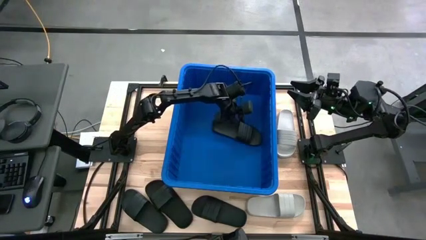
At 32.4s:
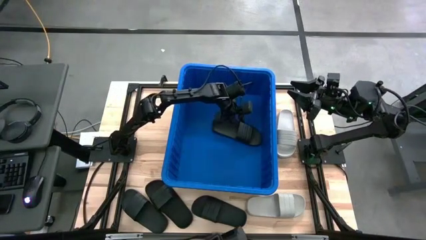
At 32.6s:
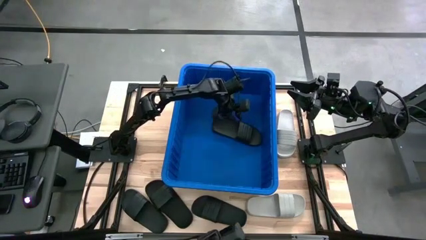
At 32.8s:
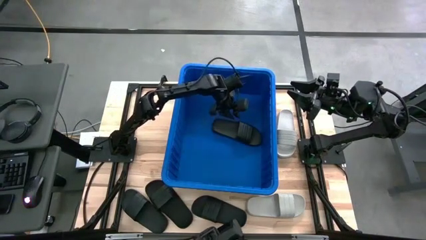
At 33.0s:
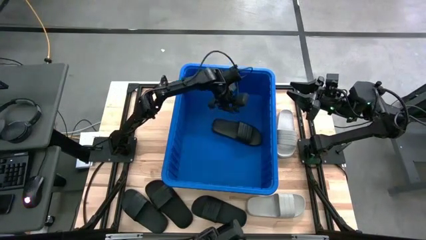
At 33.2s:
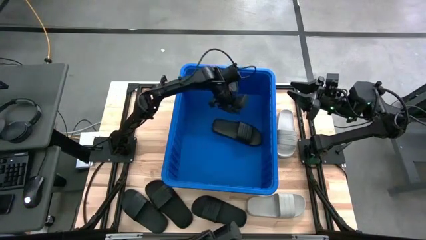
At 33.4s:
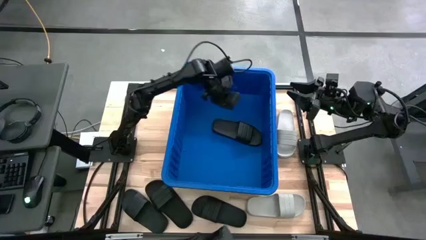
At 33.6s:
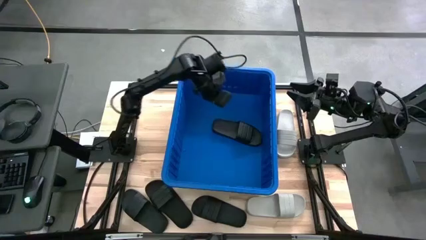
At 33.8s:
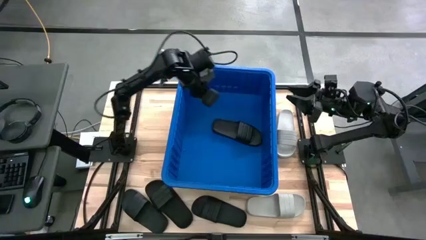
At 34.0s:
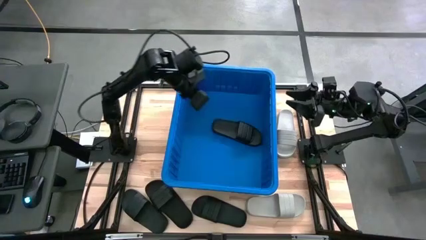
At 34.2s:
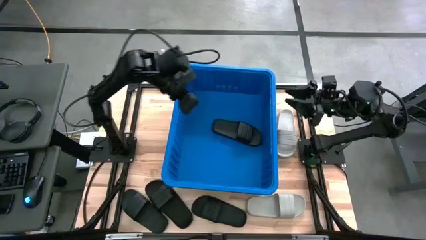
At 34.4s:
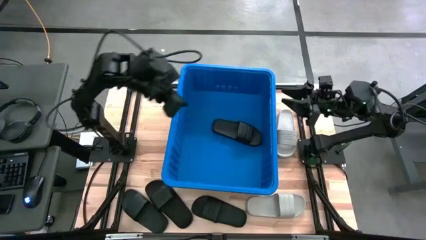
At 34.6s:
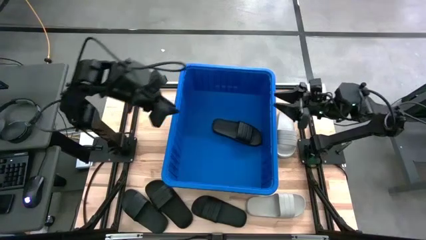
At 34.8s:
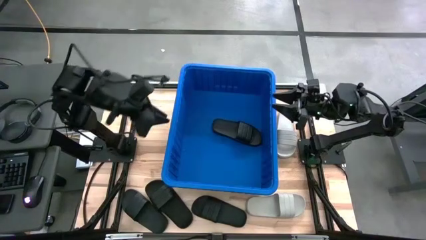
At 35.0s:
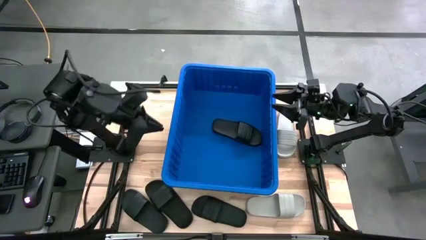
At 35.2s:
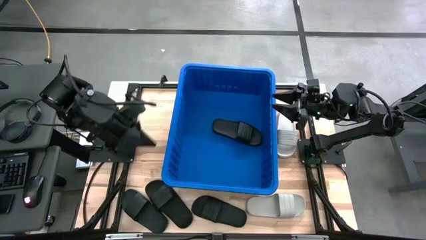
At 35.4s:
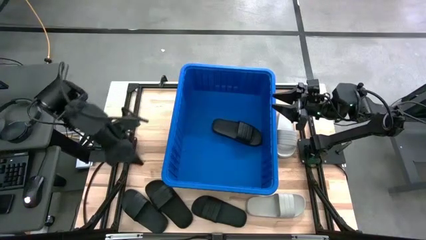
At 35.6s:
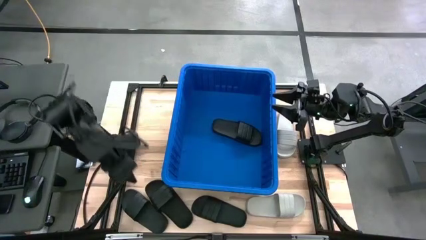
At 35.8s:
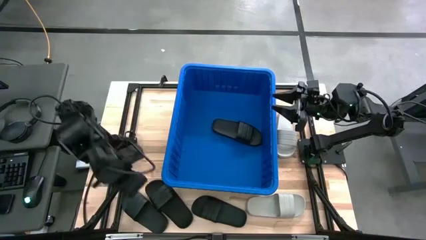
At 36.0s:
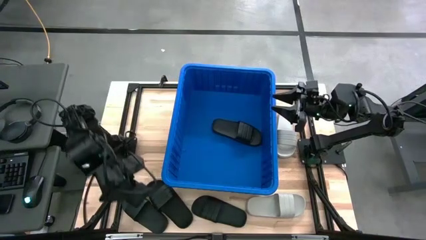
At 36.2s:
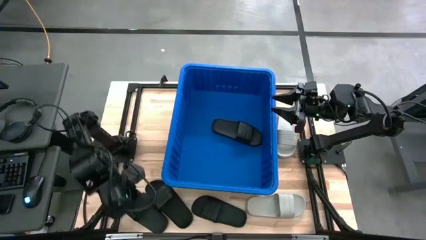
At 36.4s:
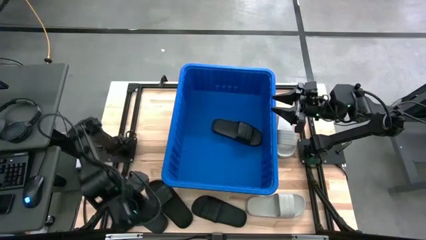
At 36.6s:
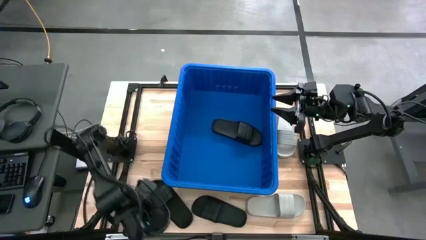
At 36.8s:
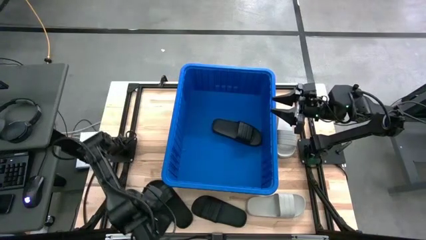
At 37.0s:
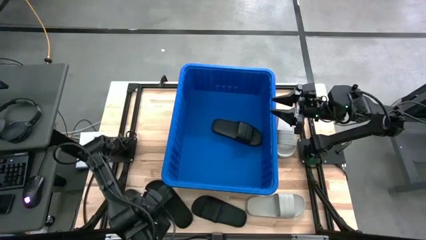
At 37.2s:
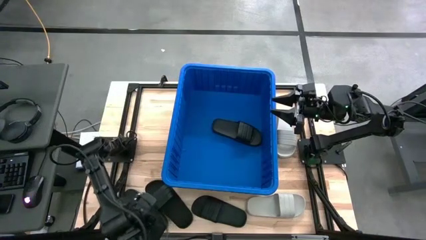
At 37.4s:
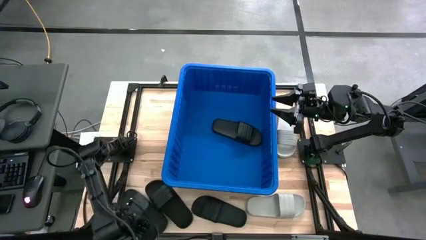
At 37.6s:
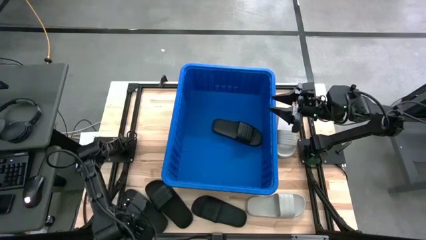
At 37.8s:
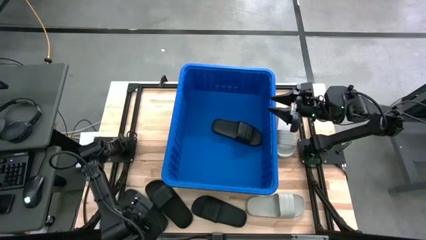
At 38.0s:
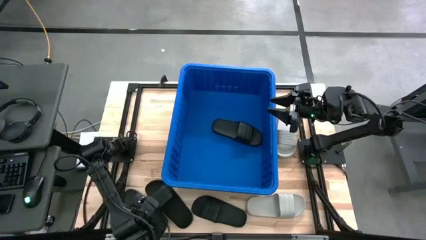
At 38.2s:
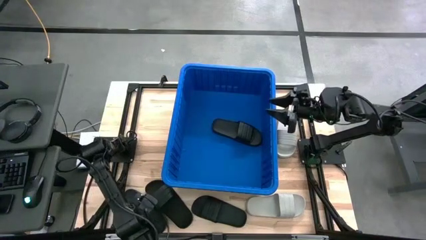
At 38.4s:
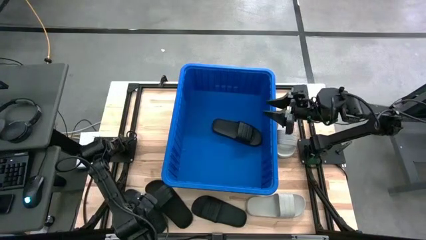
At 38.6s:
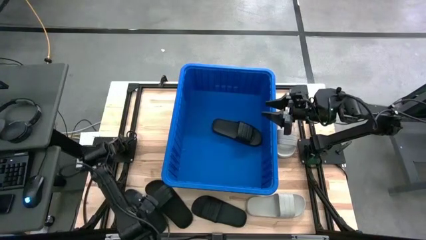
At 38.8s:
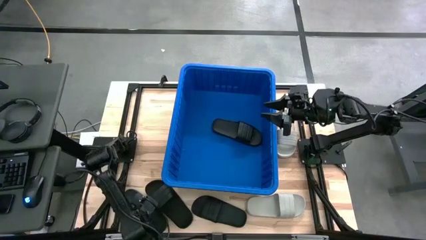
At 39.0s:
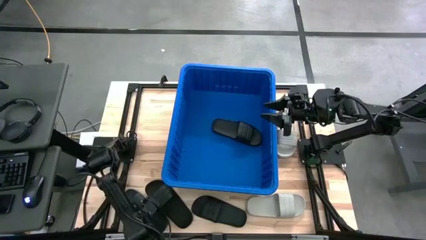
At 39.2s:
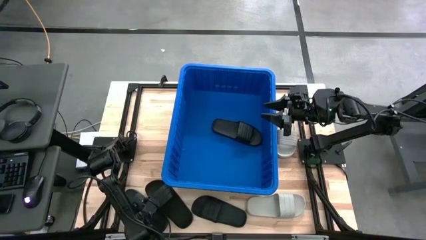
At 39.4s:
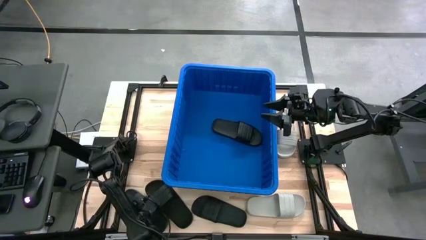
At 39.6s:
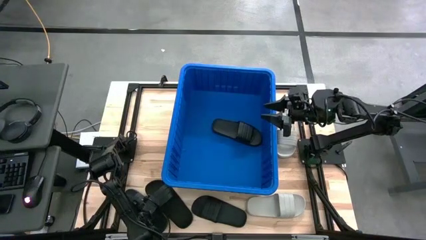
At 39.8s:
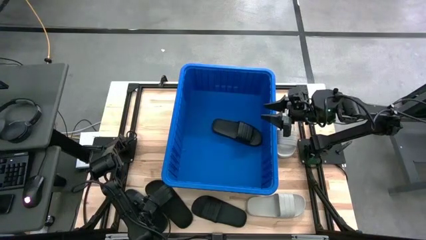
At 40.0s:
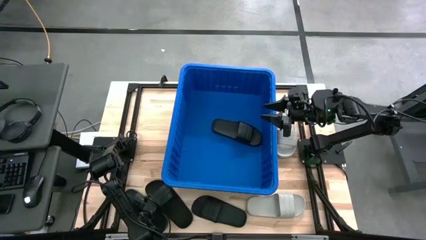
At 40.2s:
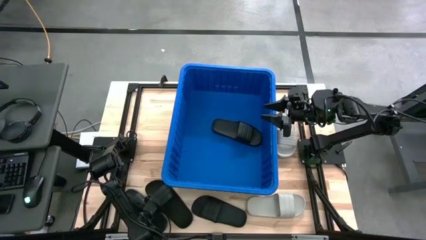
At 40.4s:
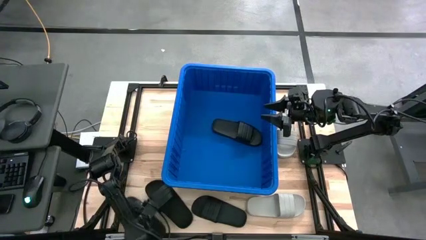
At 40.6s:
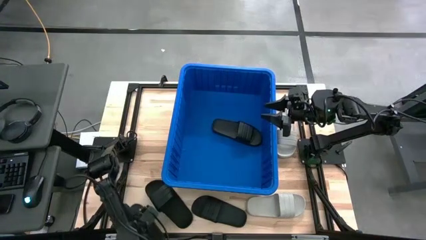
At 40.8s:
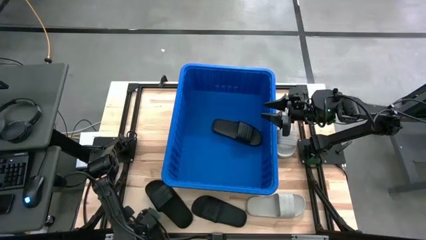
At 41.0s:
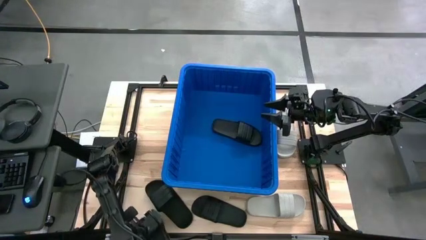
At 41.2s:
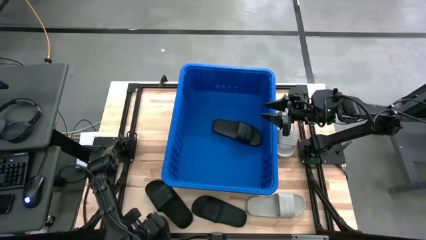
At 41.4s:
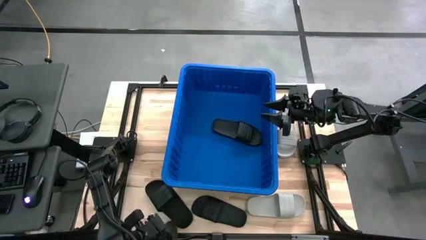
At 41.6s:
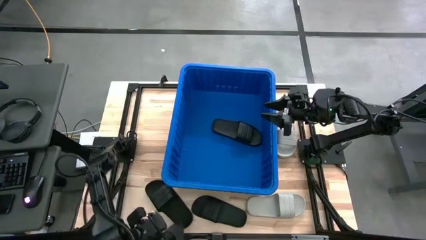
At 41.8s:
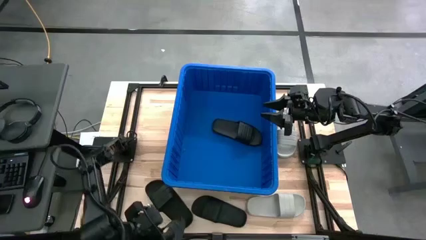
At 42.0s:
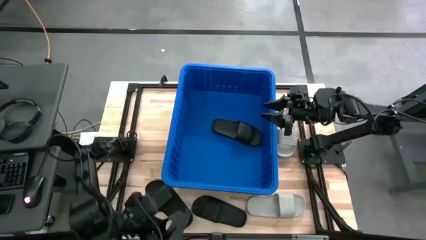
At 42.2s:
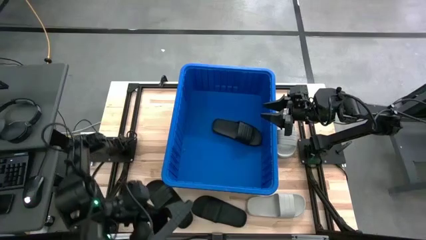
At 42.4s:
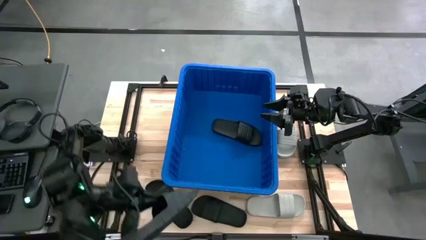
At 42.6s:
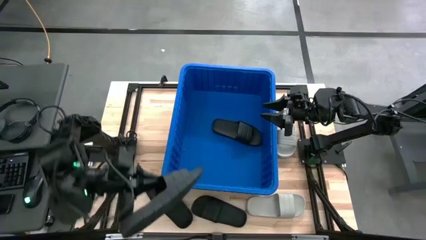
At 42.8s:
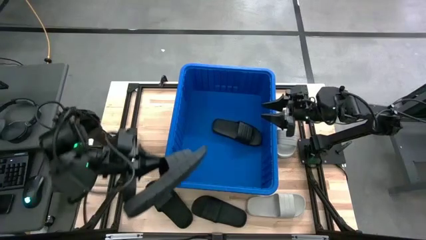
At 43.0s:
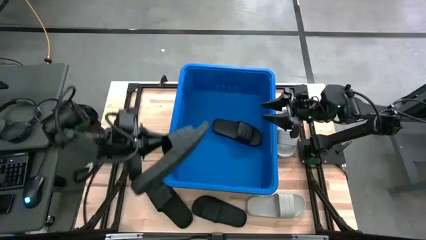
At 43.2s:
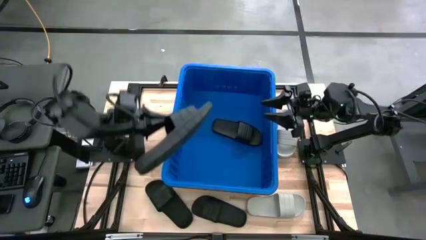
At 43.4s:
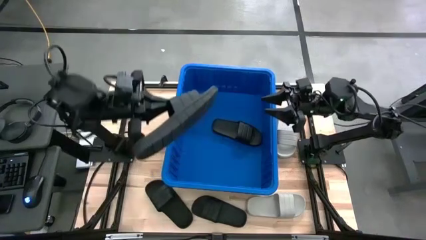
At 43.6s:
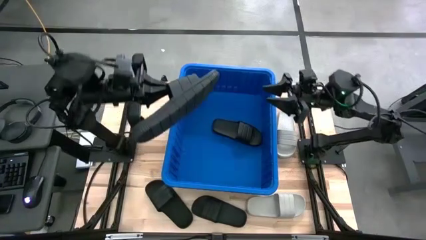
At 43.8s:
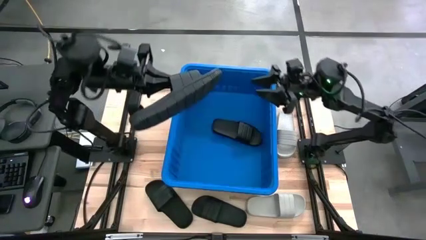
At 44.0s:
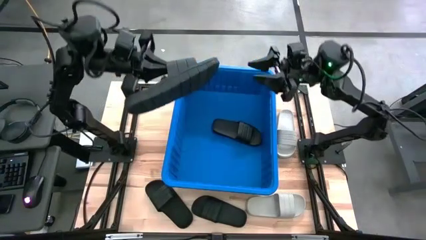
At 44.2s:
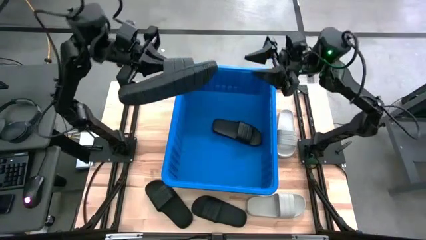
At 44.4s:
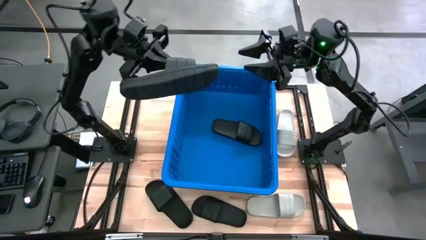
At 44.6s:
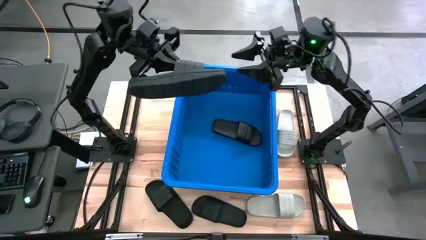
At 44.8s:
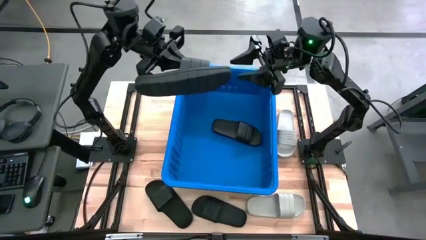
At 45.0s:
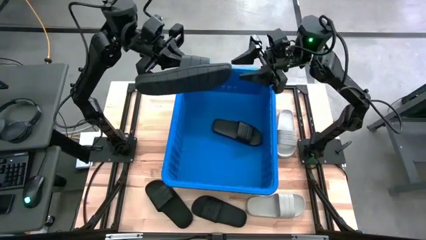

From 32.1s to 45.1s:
Task: Pick and place slides into bin
Put the black slipper into the blue bin

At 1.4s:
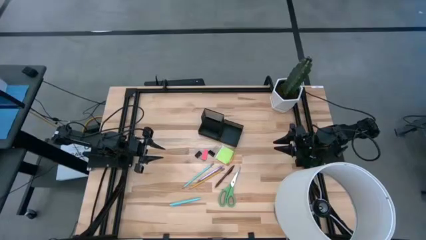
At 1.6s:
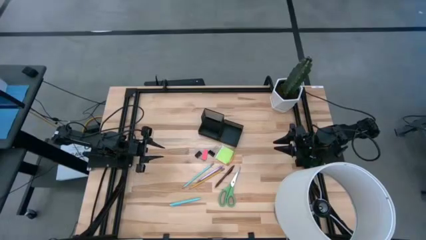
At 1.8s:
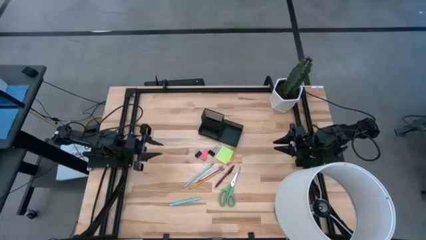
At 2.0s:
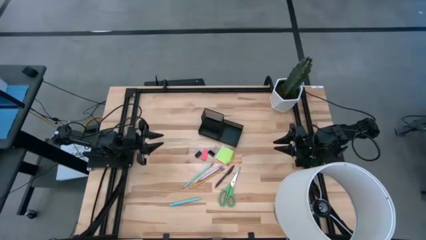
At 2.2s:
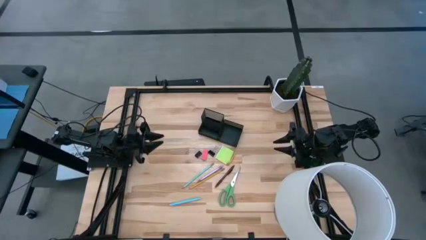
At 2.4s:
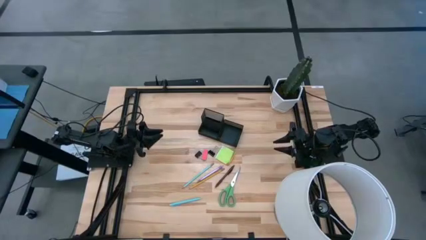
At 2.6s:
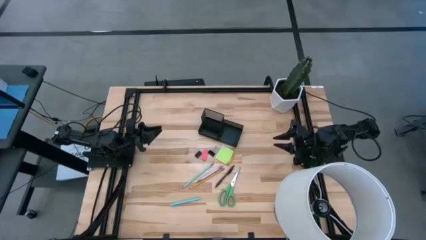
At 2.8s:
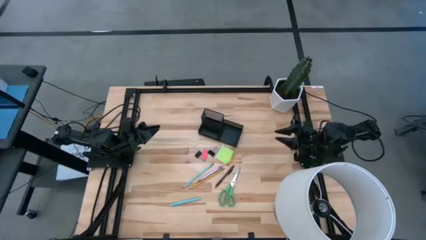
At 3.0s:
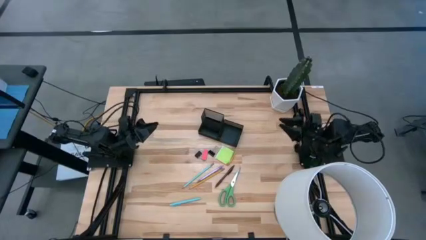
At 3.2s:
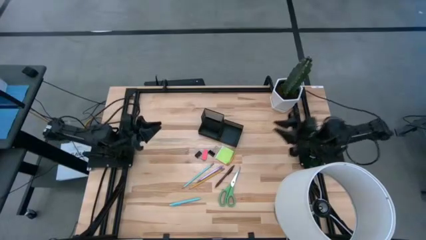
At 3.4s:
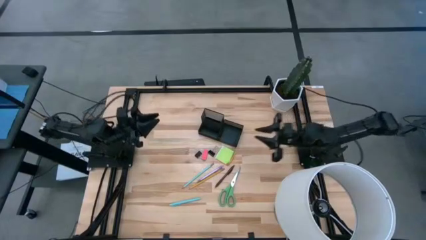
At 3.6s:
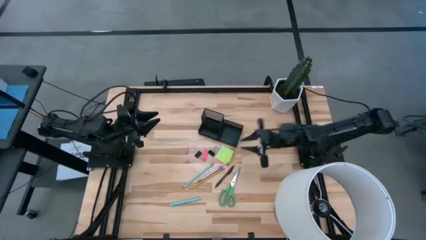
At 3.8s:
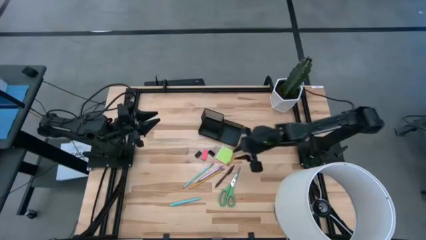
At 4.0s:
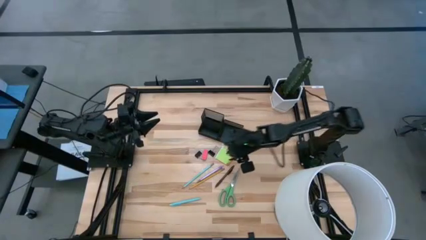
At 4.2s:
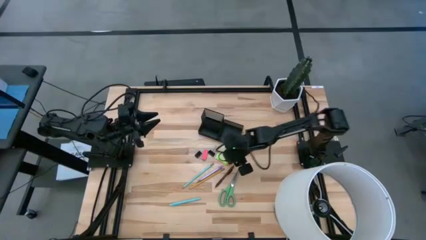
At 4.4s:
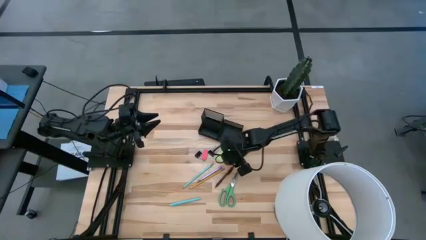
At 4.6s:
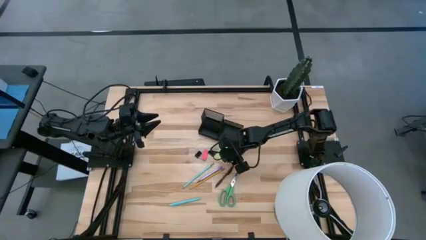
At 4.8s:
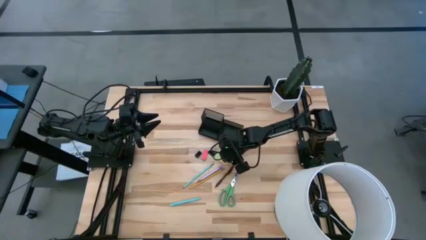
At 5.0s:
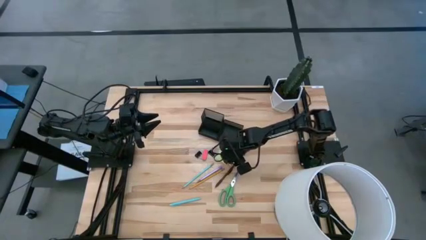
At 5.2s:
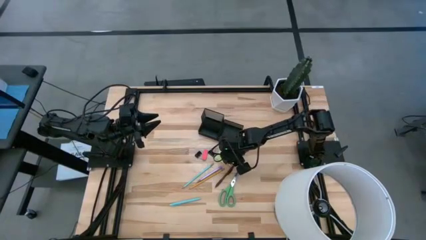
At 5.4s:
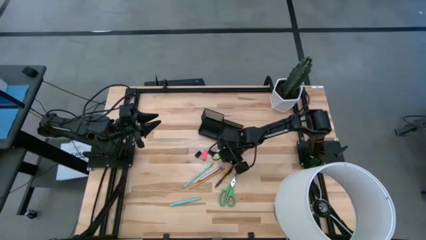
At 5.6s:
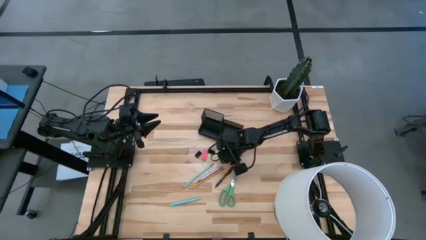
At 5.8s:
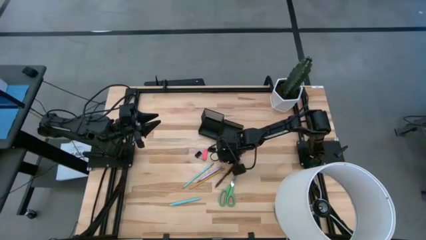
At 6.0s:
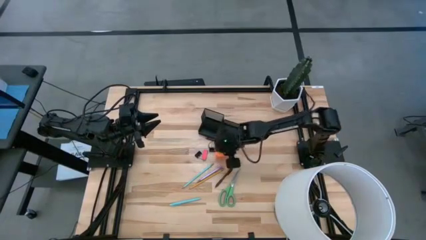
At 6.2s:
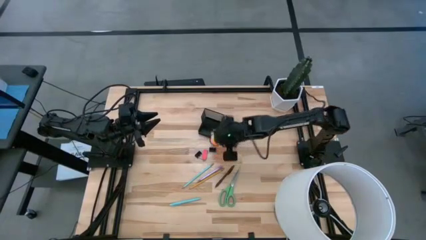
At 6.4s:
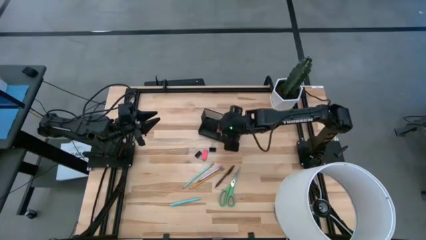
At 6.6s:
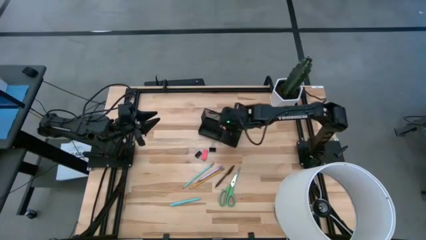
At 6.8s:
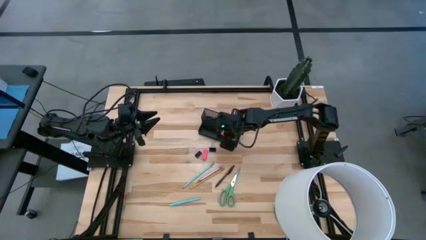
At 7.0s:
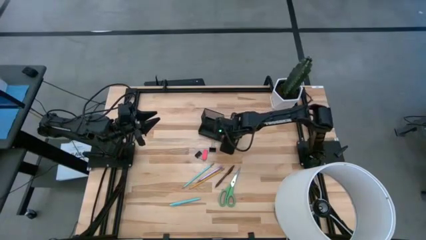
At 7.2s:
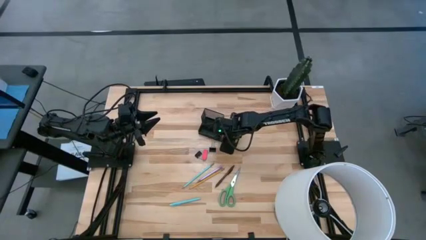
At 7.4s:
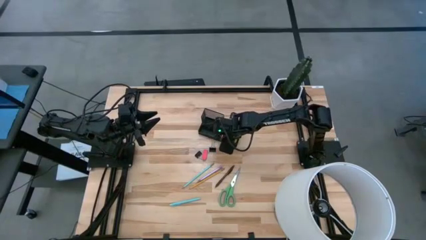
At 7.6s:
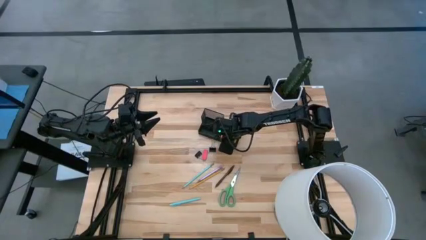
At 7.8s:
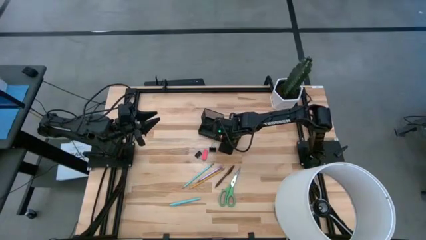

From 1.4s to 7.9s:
Task: Pick and place office supplies into organizer
Put the green sticky note into the black desk organizer
